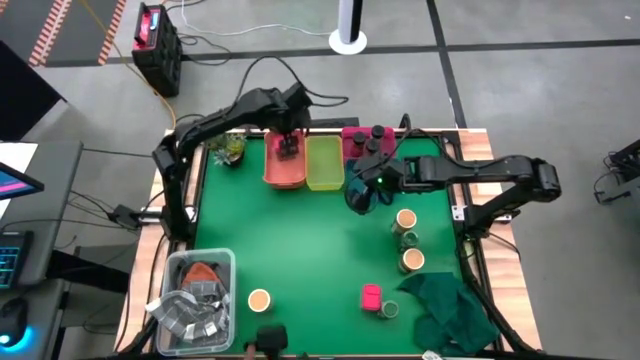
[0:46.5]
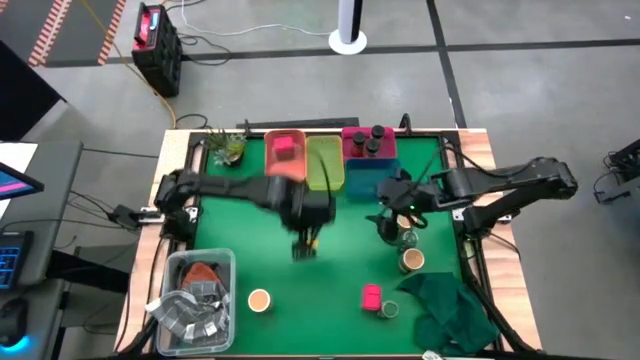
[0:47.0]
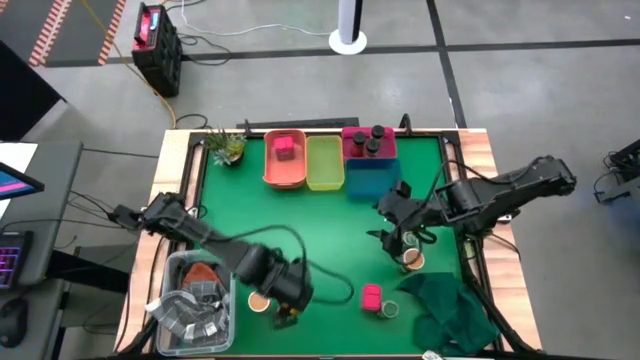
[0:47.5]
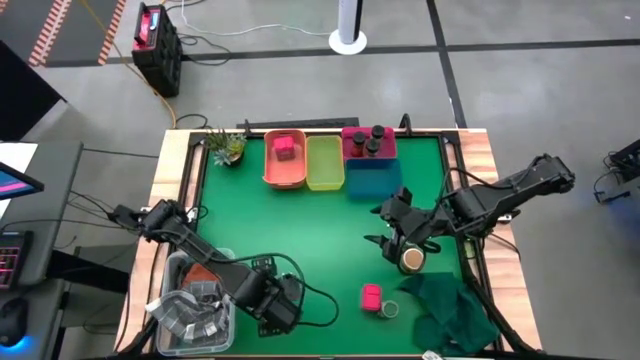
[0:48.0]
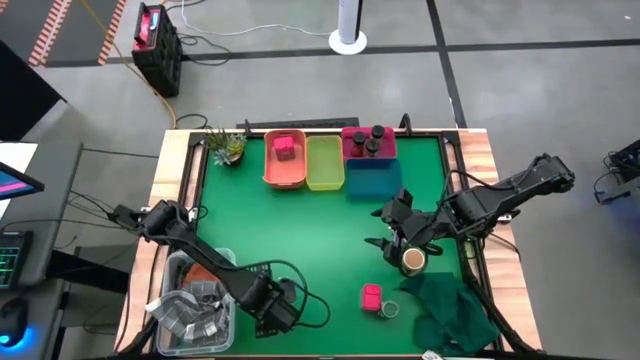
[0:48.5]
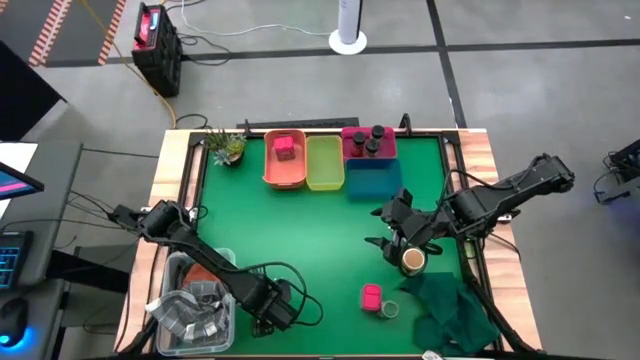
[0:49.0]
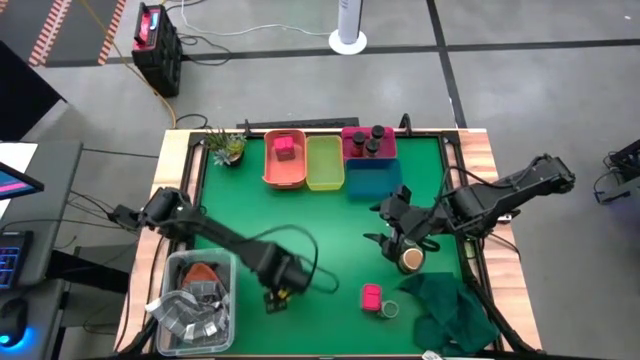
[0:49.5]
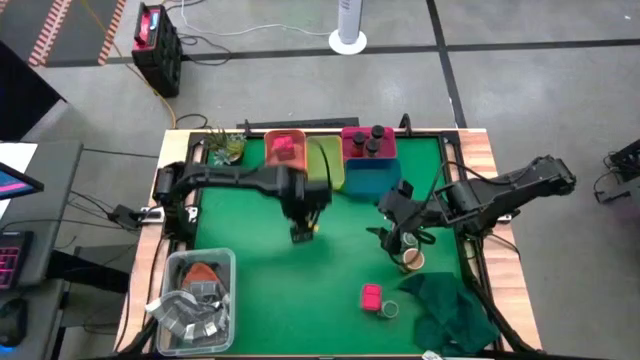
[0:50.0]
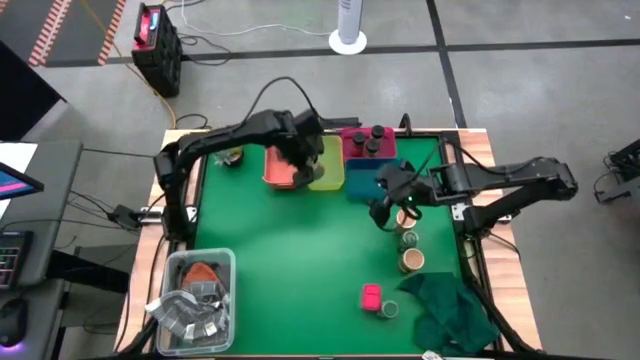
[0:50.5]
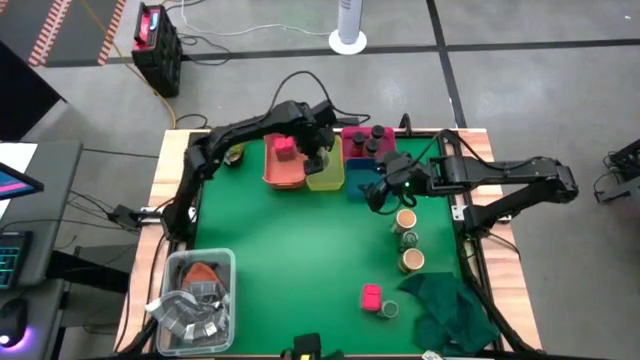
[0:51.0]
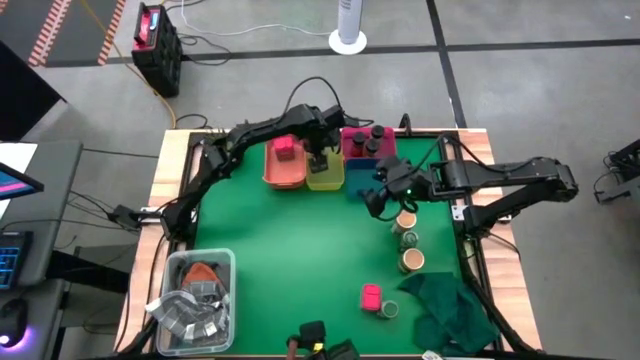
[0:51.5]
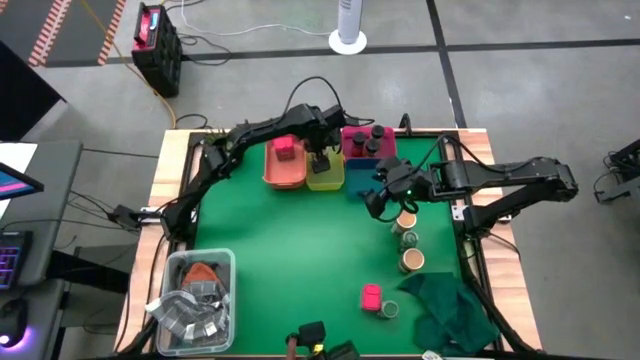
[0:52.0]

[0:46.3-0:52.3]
Task: Sort spices by type
Put the bottom brown seasoning bottle into the yellow bin

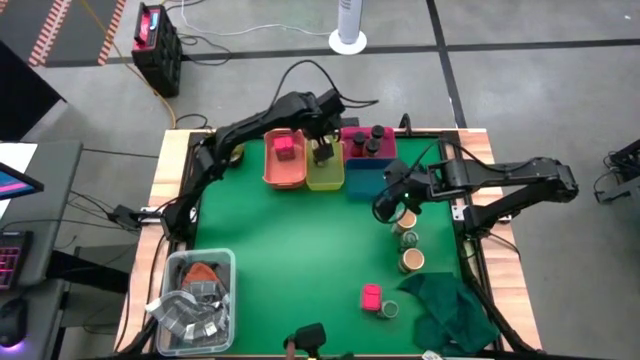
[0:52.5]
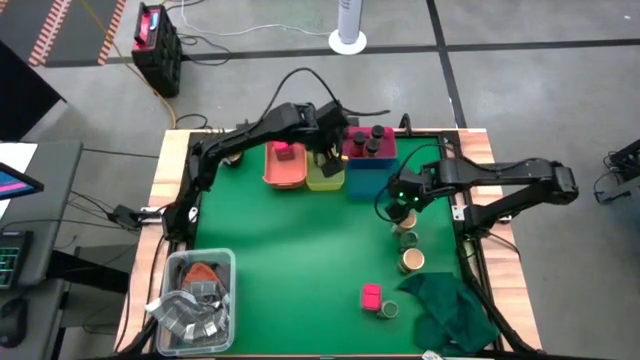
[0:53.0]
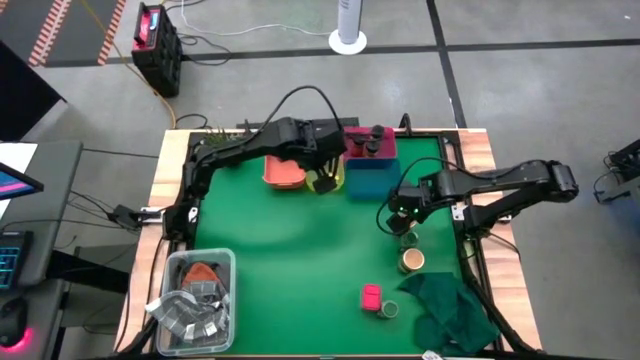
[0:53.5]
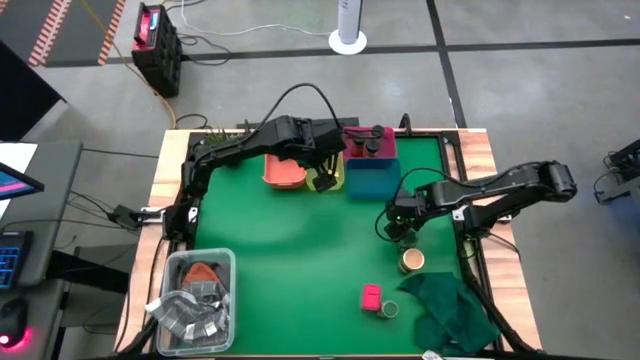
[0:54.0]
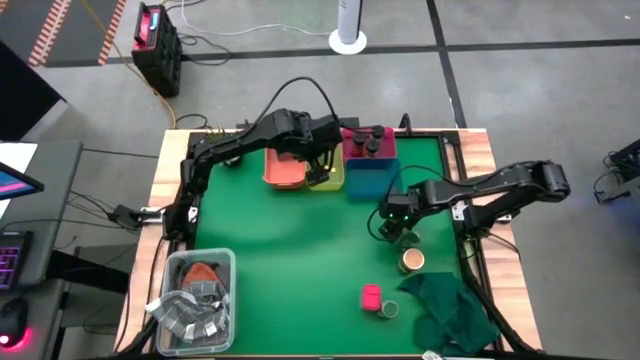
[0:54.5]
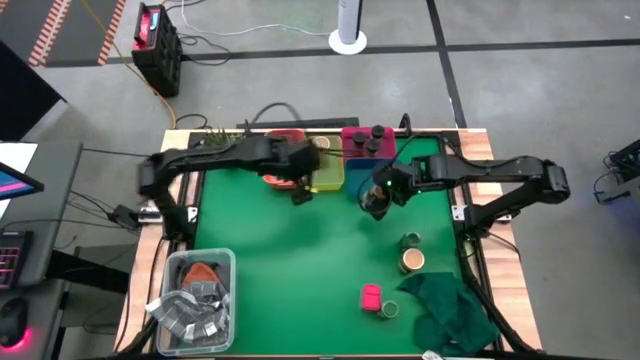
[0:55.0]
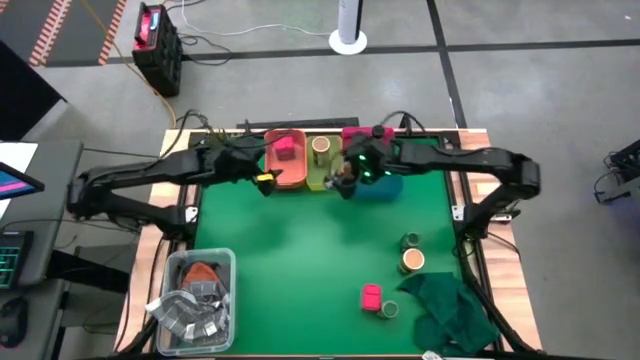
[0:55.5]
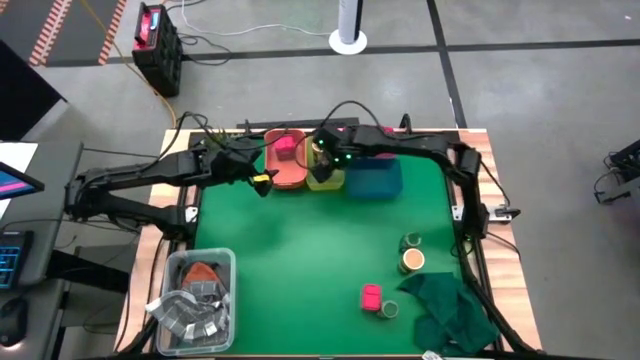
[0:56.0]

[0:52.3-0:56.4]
Put the top brown seasoning bottle into the yellow bin

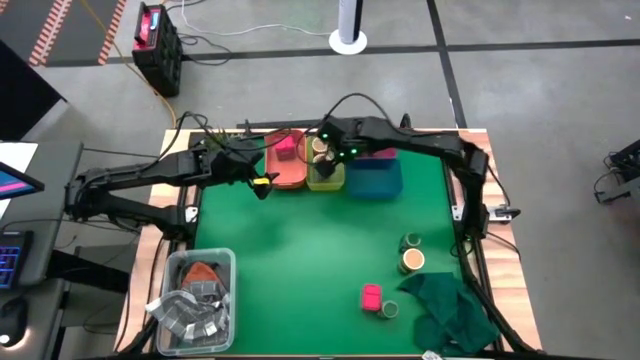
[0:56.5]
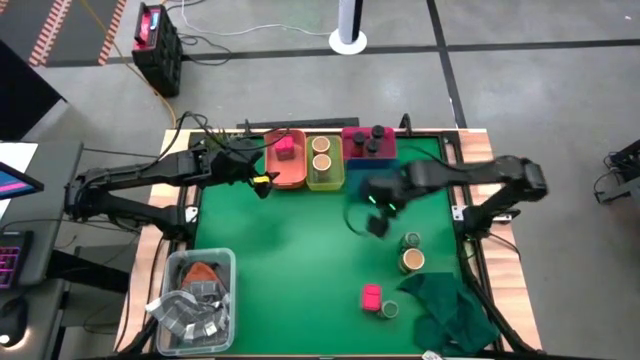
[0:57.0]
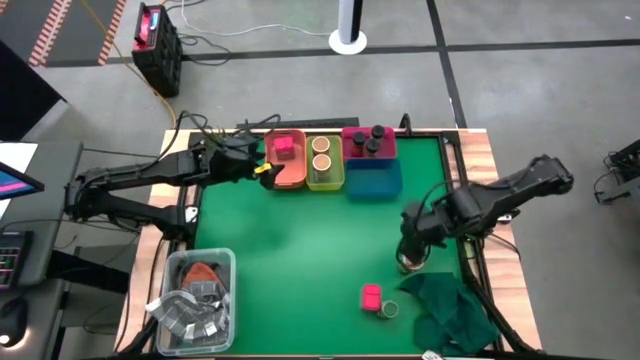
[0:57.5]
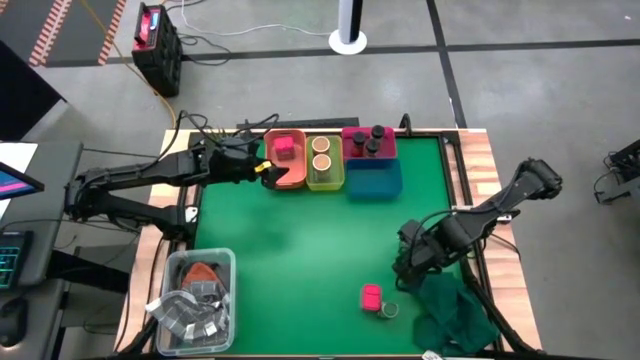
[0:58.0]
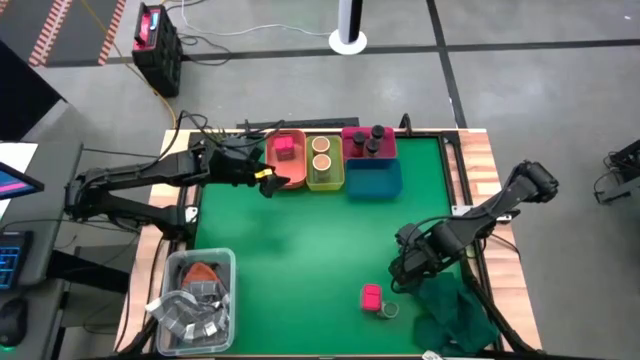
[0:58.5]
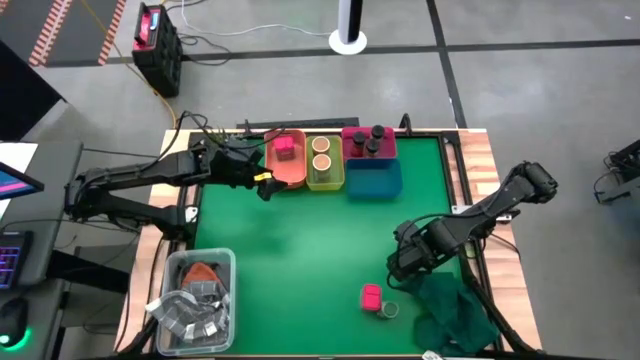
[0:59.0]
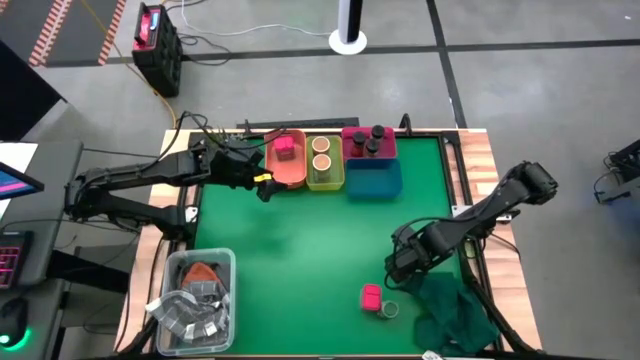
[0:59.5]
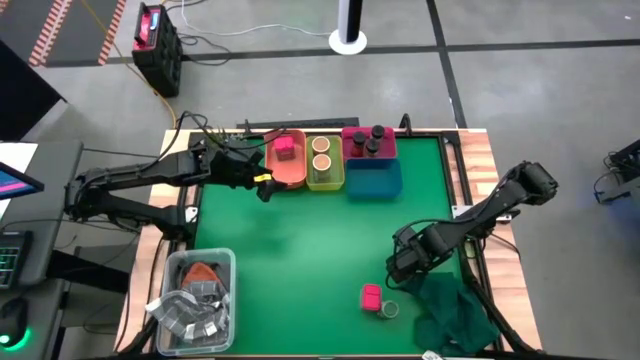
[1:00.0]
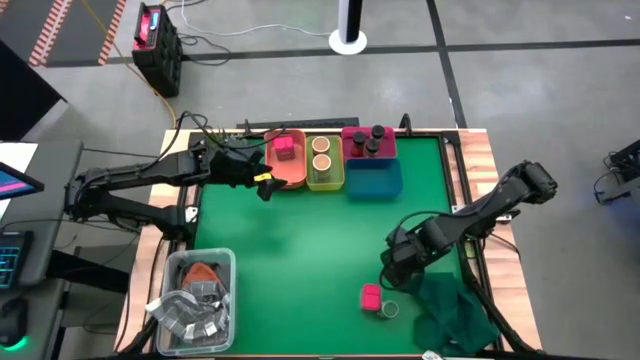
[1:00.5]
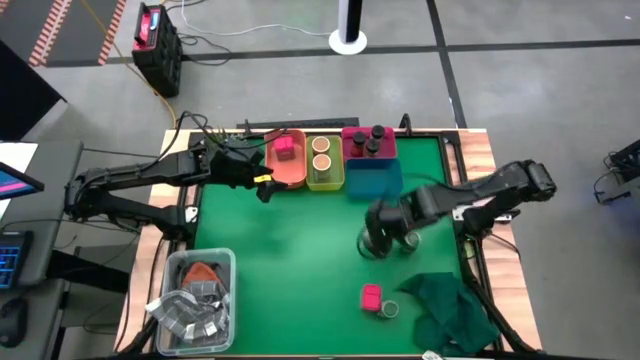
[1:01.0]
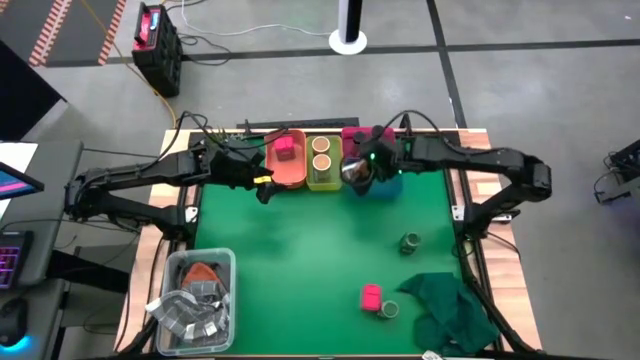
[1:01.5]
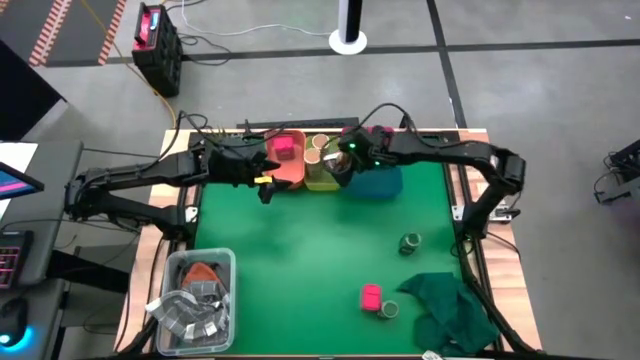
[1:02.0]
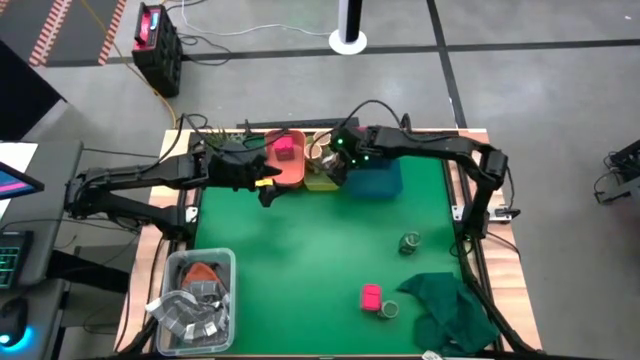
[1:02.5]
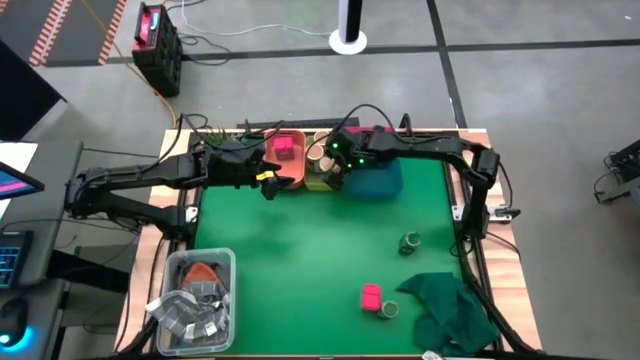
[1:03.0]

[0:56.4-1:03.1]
Put the brown seasoning bottle into the yellow bin

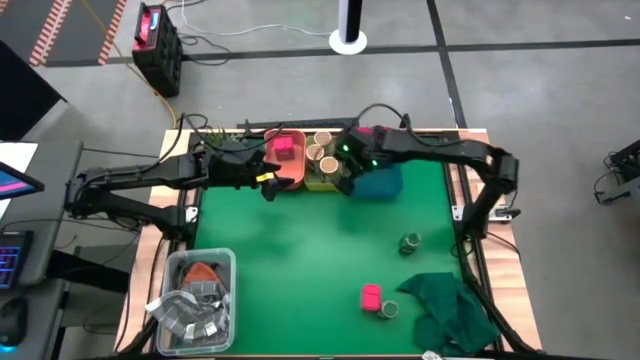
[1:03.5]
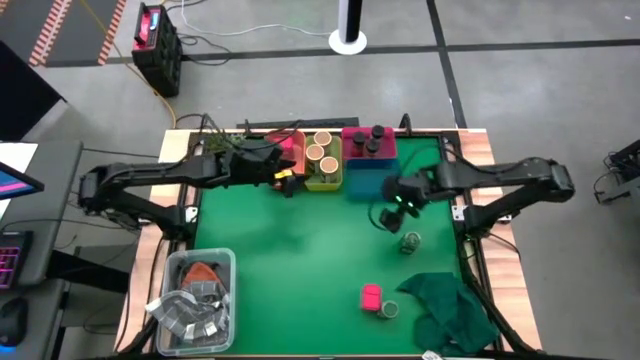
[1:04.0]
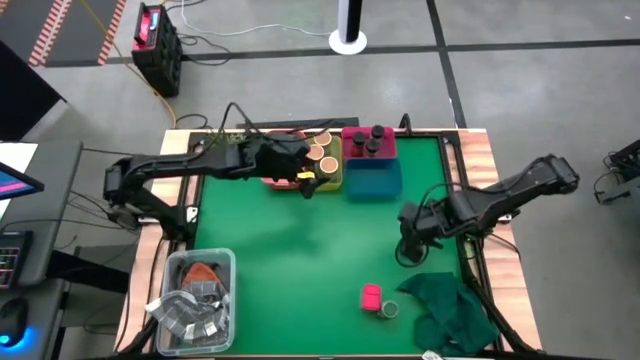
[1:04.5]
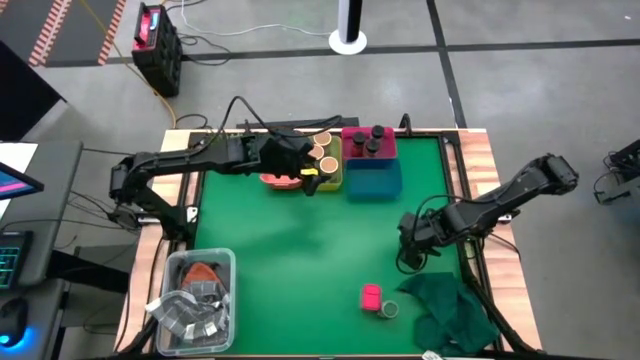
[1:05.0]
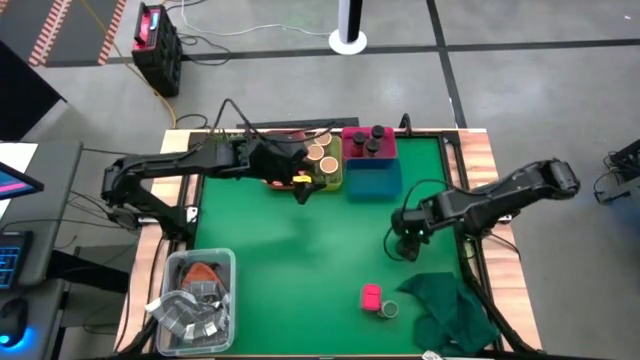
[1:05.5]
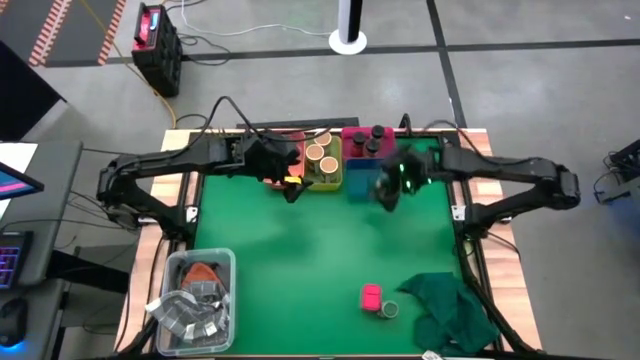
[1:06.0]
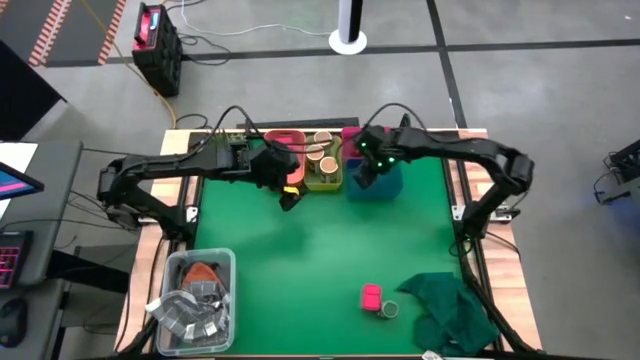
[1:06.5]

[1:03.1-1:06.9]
Put the top green seasoning bottle into the blue bin

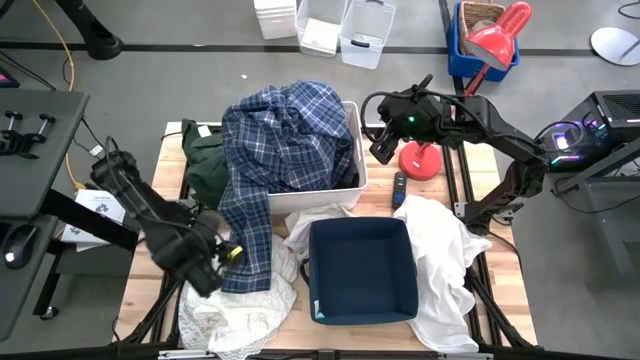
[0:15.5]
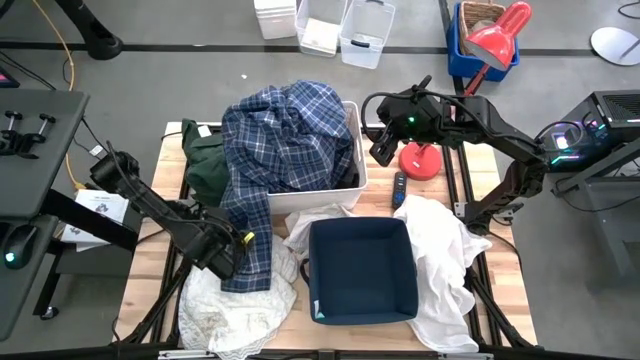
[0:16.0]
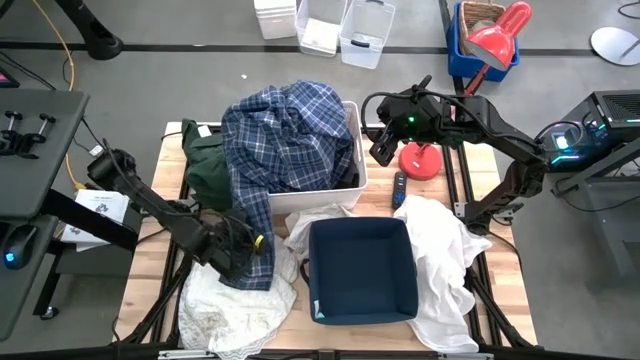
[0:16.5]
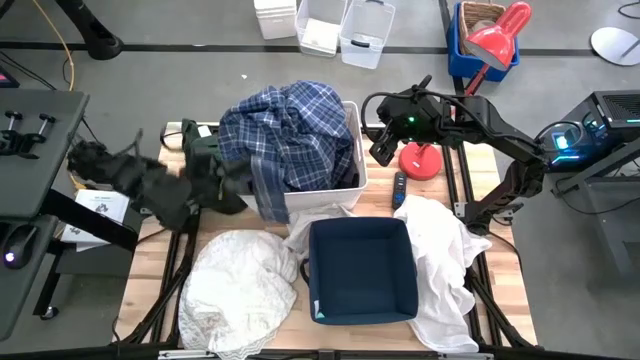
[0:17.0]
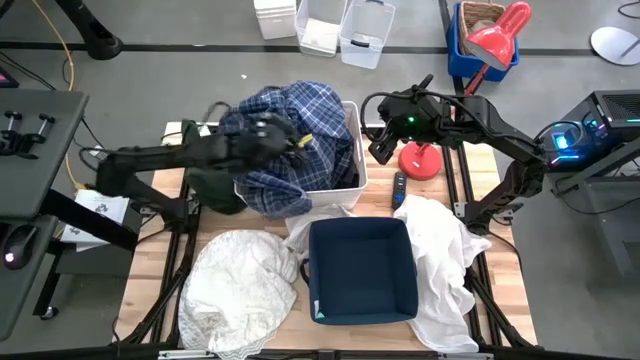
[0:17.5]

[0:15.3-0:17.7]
Task: Sort clothes
Put the blue polo into the white laundry bin
